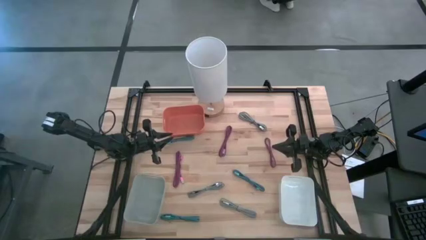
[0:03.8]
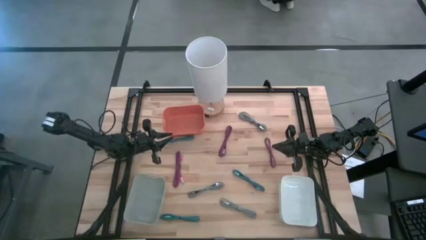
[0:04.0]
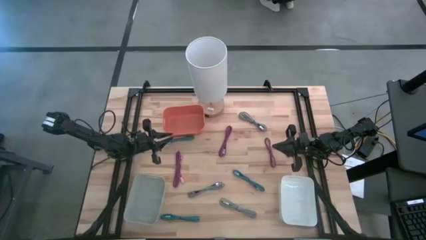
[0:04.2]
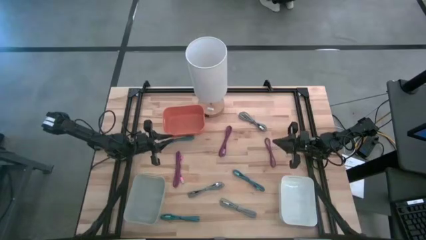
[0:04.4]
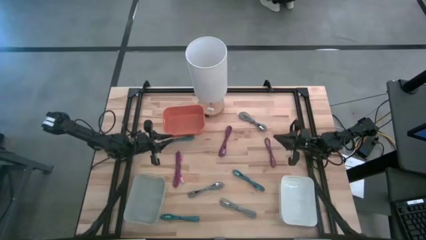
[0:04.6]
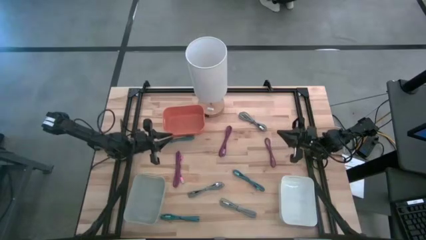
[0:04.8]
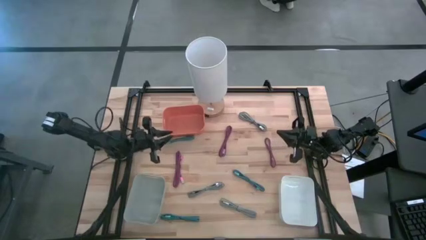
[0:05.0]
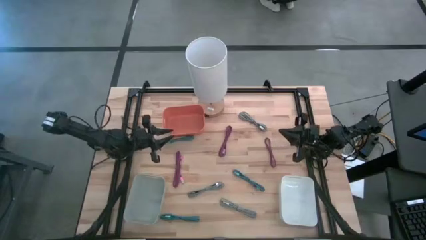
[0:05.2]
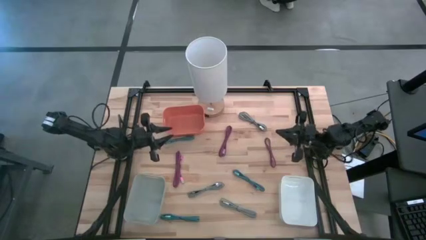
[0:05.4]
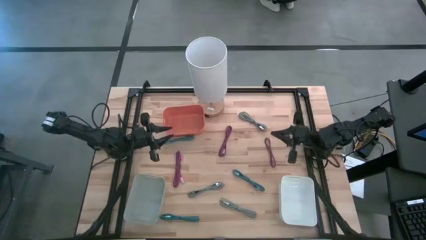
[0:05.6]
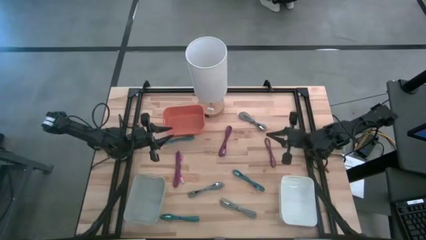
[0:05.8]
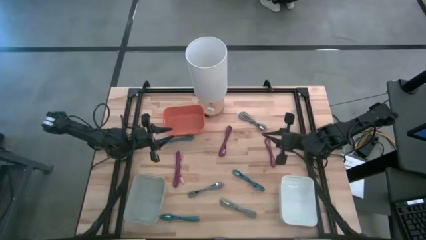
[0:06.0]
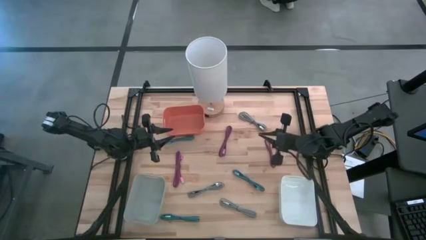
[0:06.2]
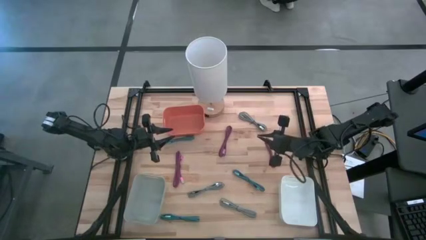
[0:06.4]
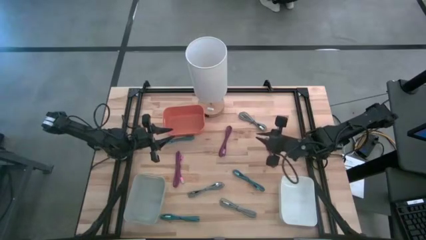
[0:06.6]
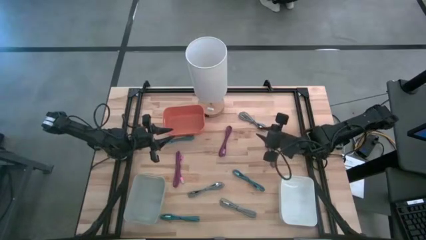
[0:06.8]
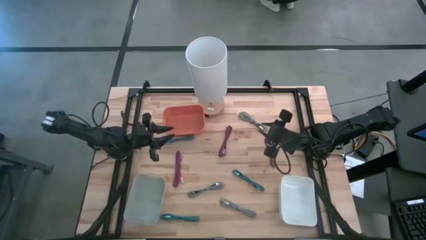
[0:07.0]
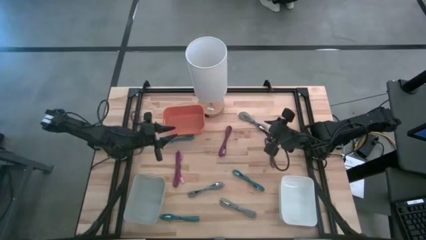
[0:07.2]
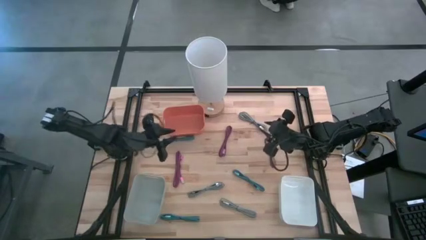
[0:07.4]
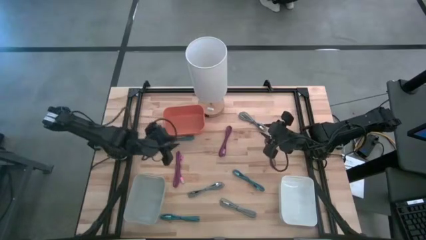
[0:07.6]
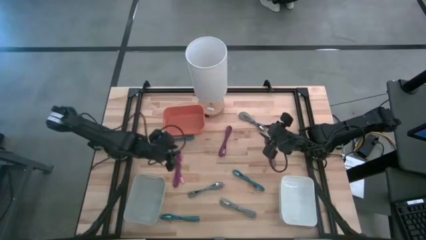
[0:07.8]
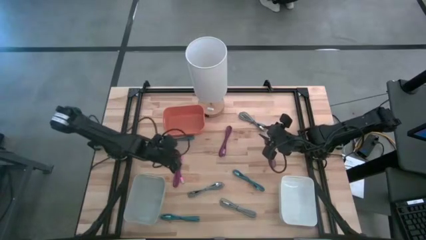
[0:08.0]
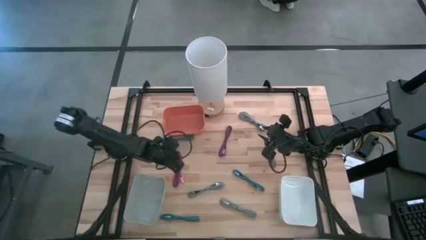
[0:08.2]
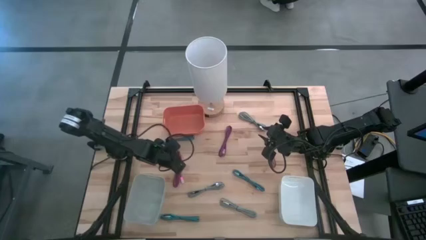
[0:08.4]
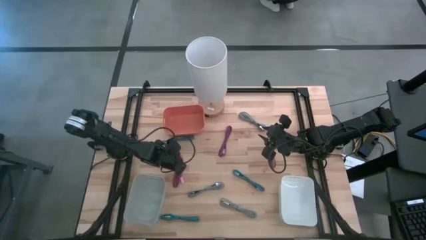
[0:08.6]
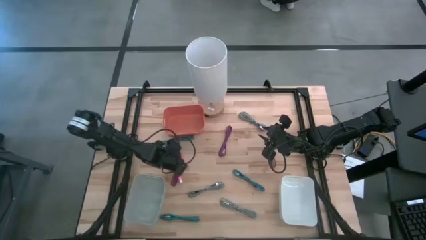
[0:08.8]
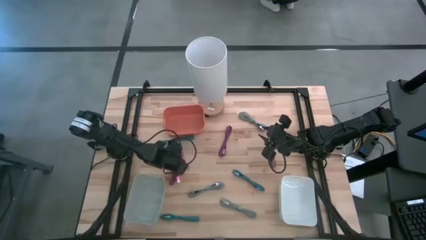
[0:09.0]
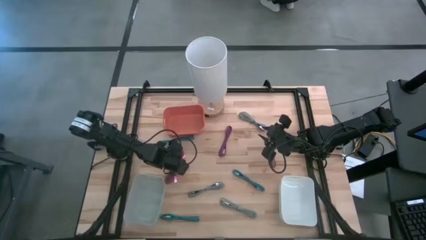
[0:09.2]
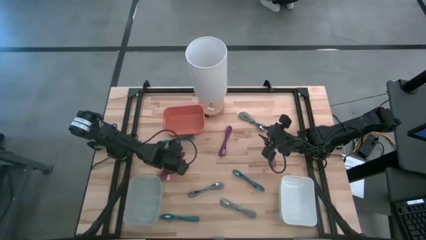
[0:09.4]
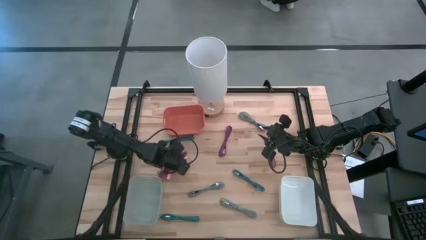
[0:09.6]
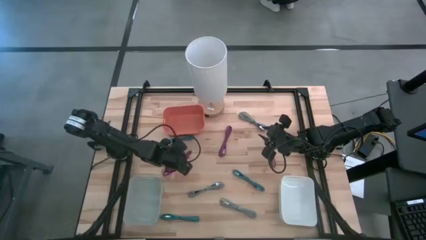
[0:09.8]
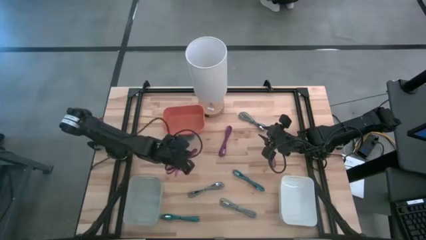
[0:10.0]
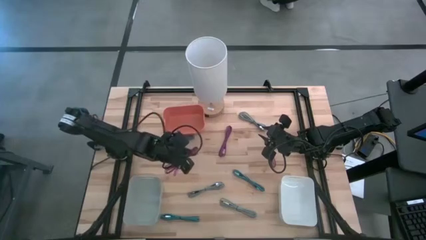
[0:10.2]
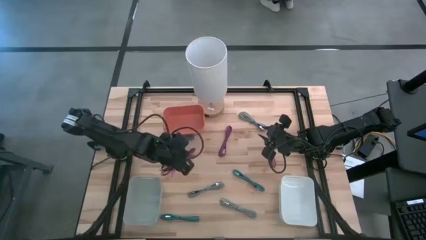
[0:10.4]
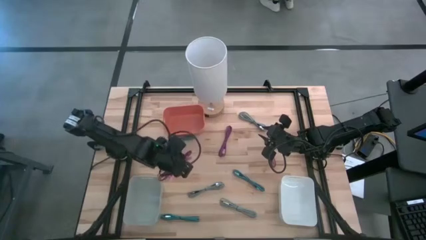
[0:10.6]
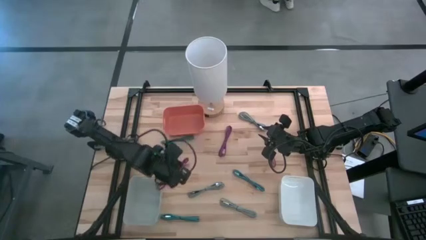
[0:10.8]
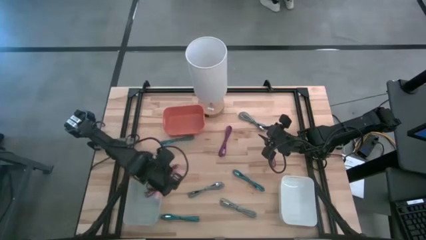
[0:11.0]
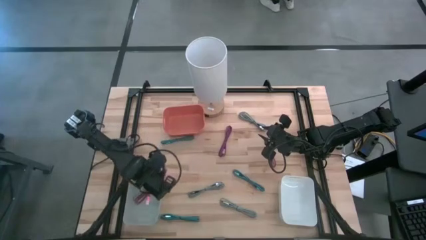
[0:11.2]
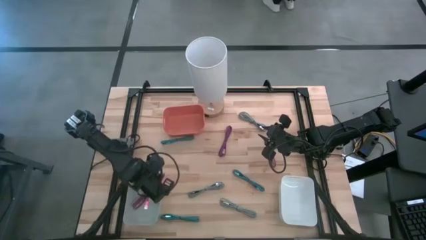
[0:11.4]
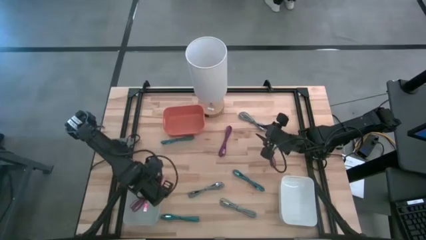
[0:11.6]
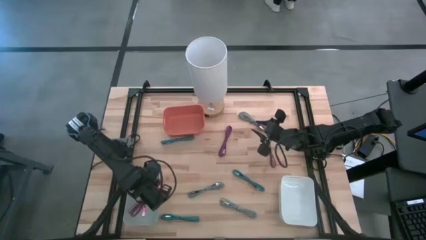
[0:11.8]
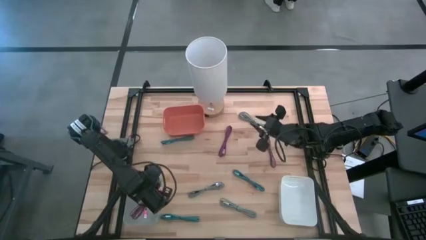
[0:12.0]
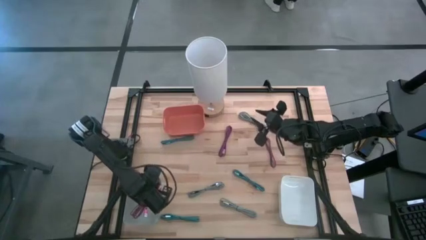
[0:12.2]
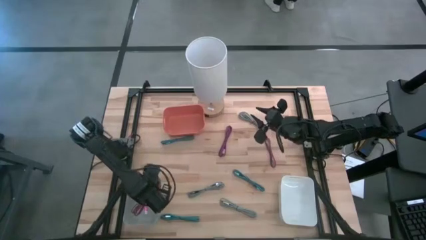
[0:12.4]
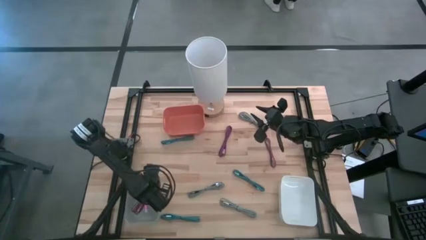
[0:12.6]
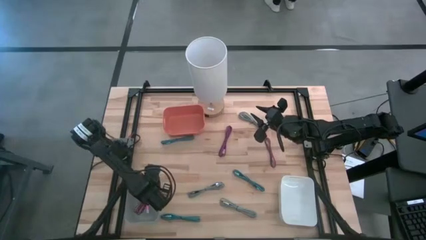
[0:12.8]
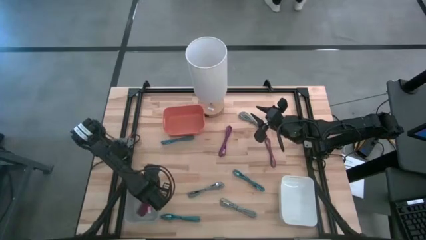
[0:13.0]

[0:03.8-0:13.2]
Task: Pick & Place USB Port
Put the bottom left pink charger cable into the gray bin

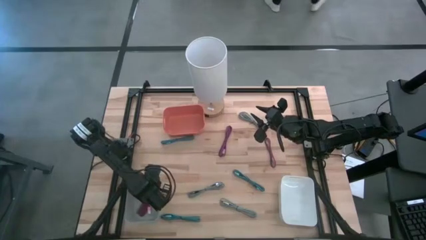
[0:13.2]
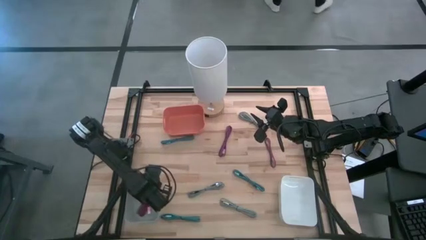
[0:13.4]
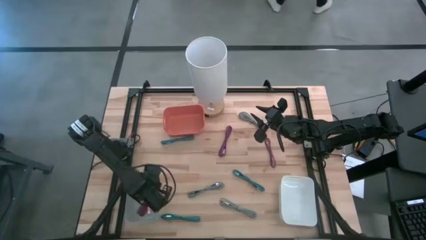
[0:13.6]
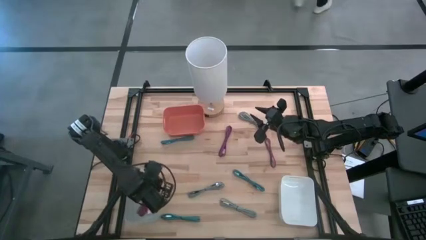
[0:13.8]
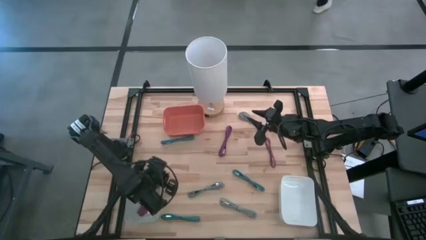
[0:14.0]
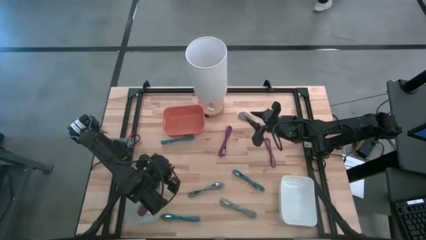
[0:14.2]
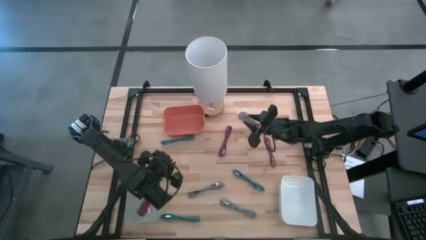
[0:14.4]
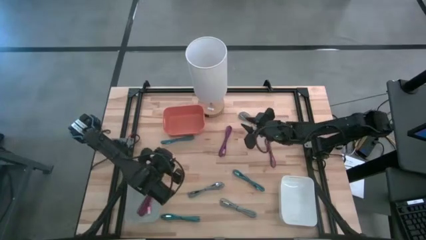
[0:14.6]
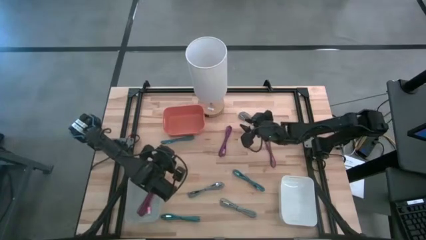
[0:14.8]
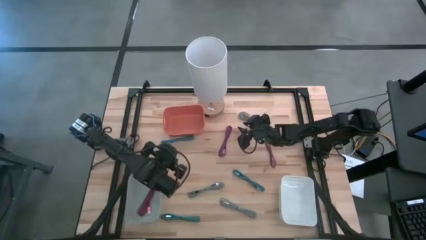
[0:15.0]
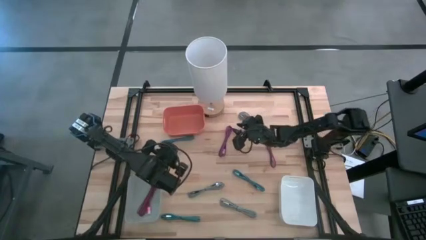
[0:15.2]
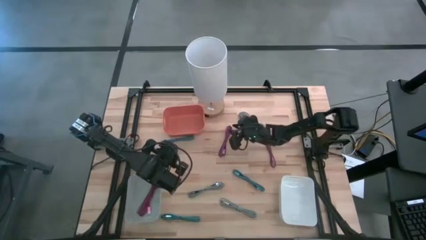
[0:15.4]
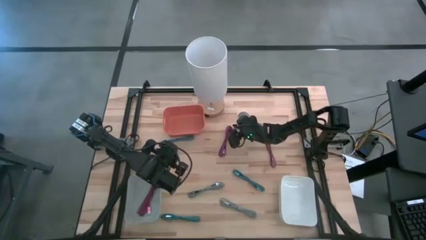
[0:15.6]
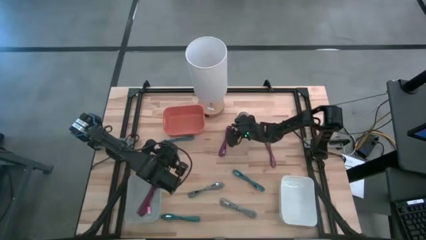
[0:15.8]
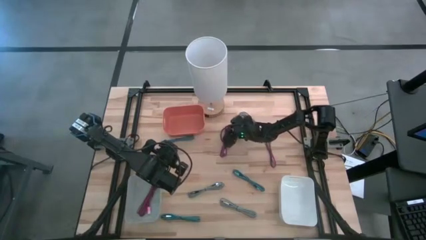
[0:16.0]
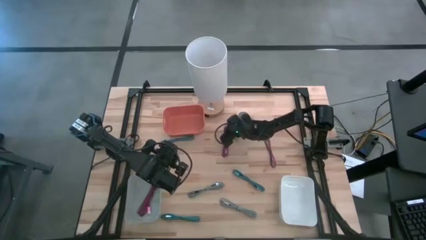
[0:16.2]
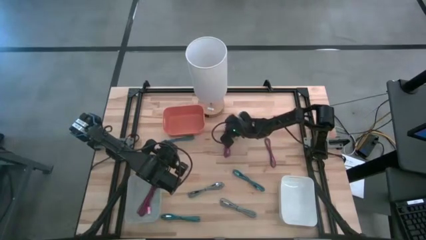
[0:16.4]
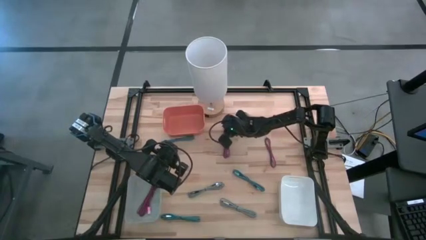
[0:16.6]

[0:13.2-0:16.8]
Put the left pink charger cable into the gray bin

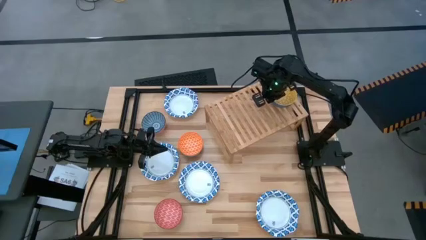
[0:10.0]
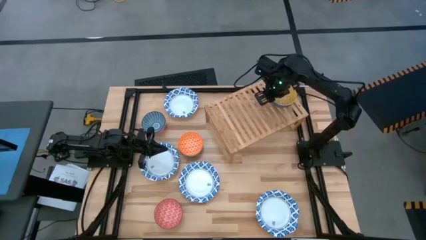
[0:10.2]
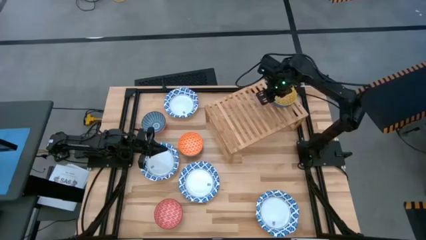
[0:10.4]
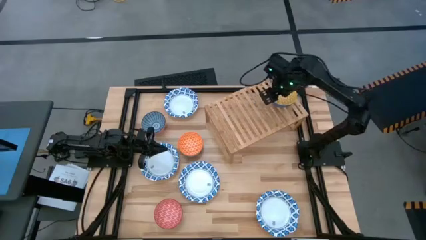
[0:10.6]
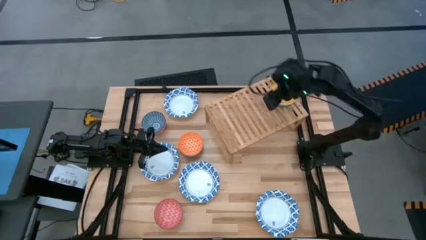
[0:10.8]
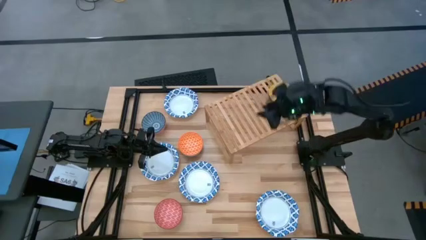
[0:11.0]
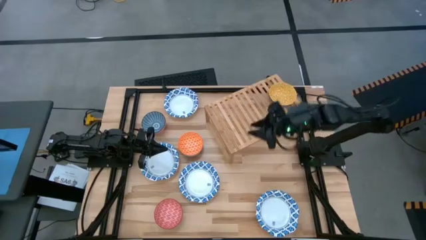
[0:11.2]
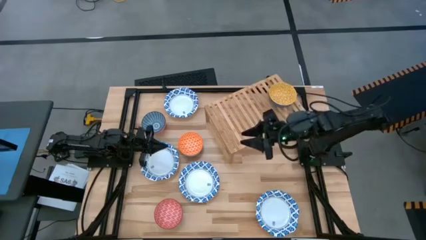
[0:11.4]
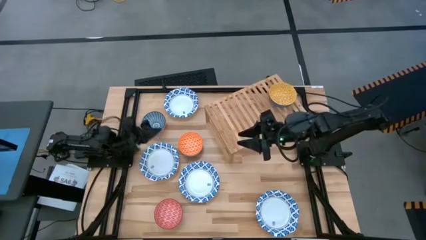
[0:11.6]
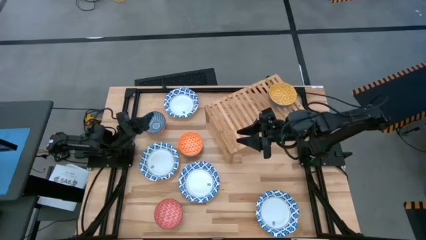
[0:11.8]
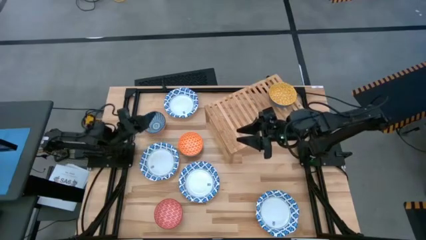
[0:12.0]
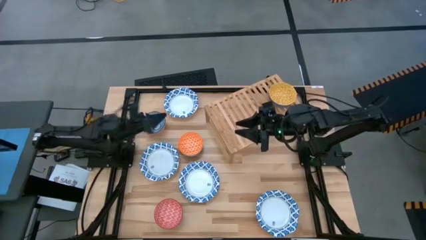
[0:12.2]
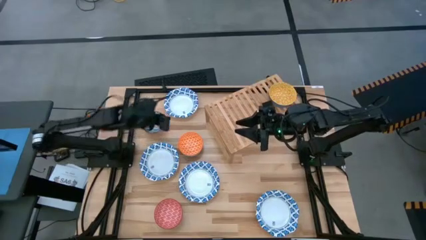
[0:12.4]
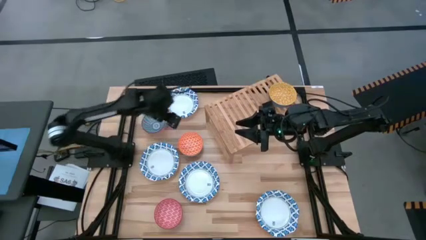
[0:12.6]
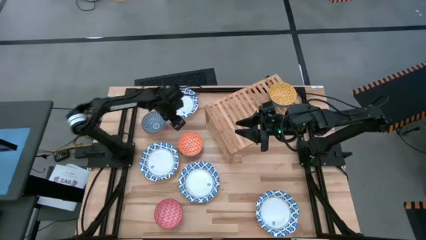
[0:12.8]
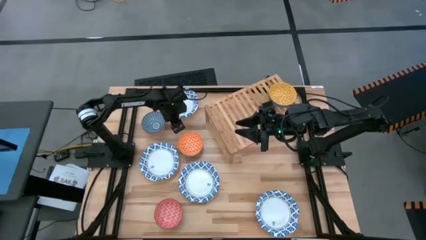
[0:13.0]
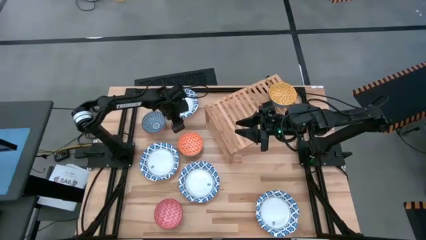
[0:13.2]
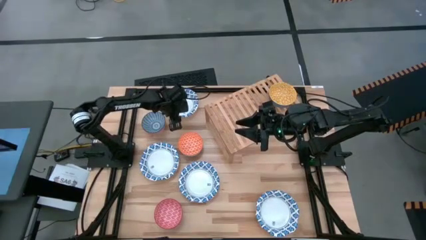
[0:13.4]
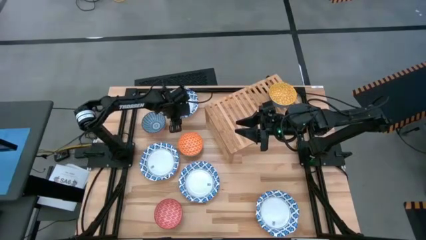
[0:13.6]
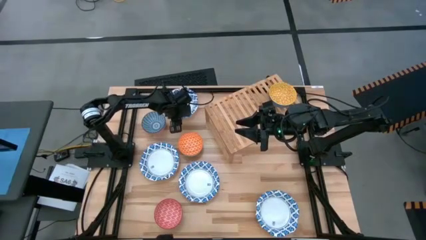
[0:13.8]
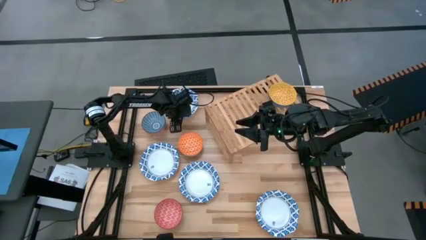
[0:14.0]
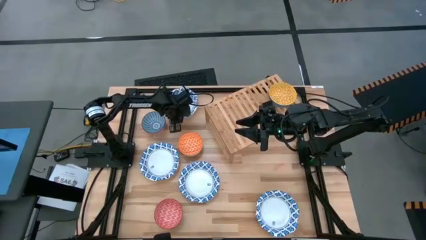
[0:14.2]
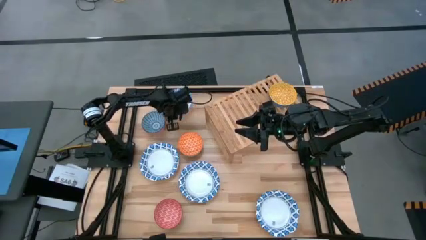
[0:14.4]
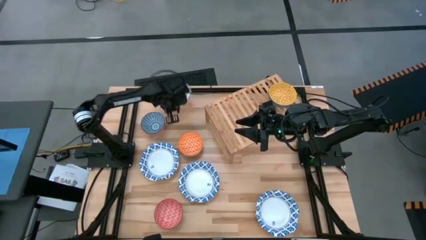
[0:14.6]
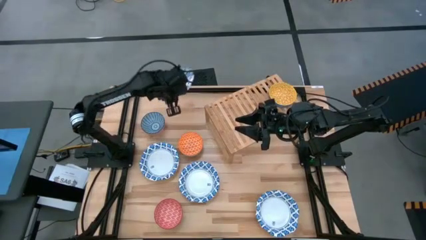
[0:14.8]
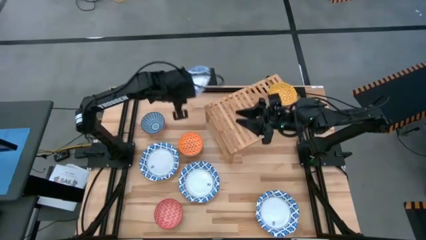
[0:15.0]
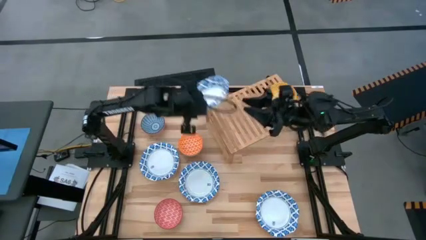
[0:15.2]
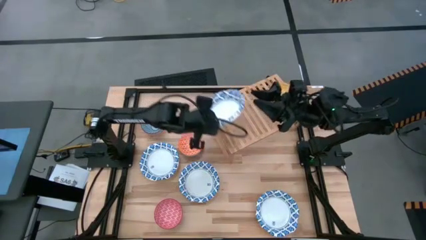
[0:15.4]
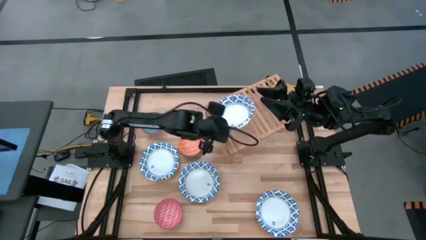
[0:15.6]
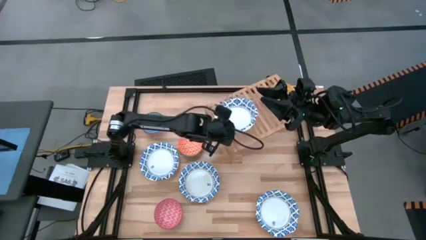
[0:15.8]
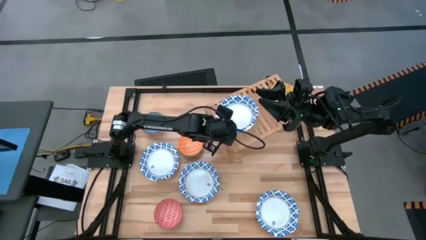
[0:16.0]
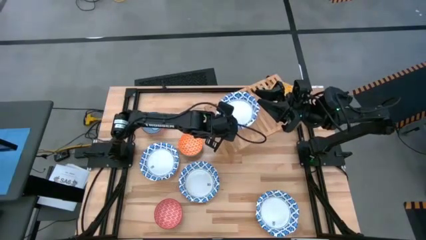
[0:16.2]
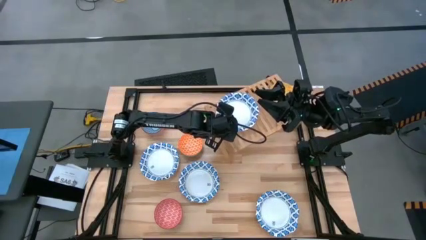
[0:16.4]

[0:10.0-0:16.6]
Task: Place and stack bowls onto a shelf
Put the top white pattern bowl on the shelf
